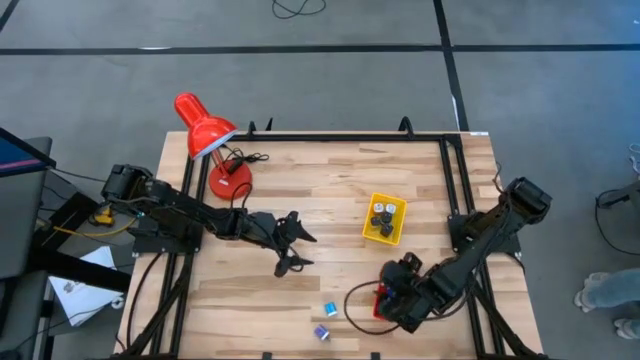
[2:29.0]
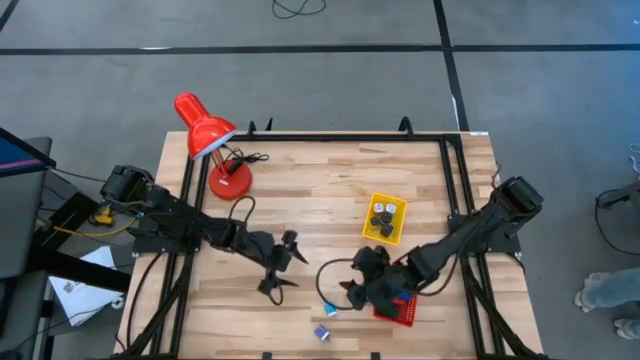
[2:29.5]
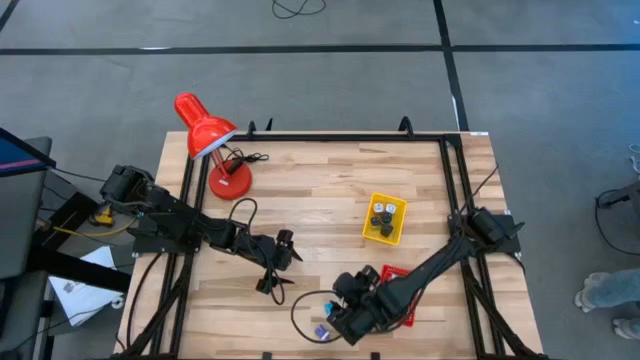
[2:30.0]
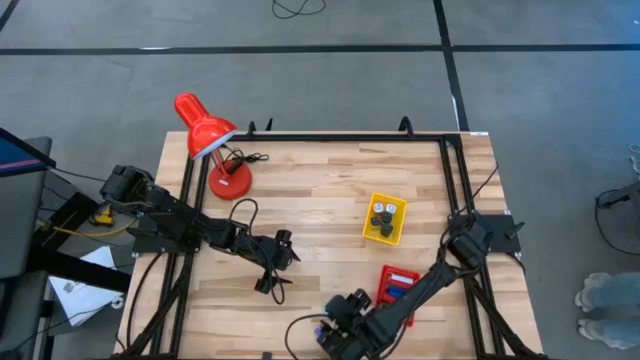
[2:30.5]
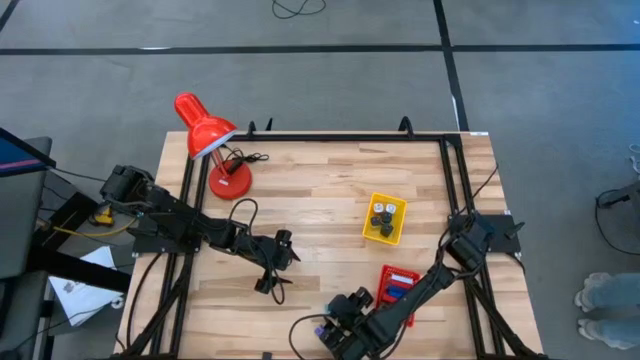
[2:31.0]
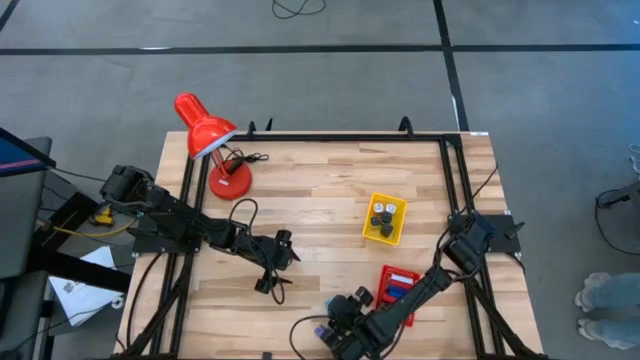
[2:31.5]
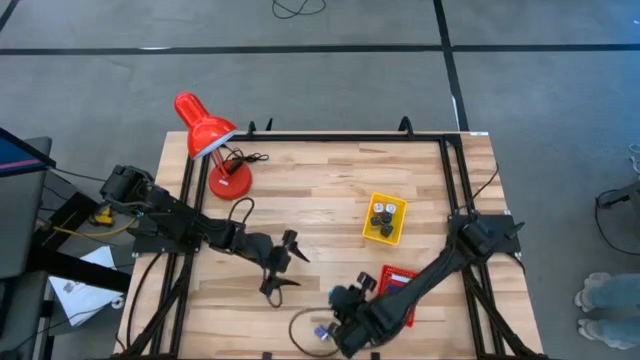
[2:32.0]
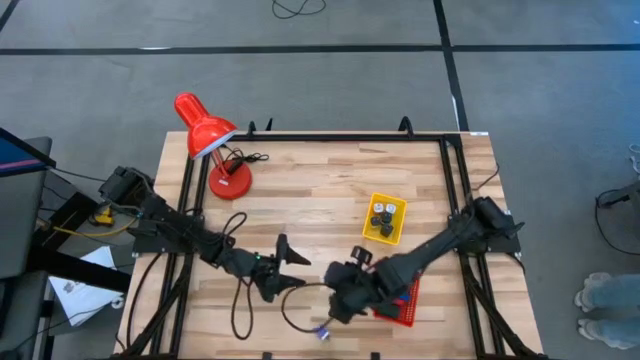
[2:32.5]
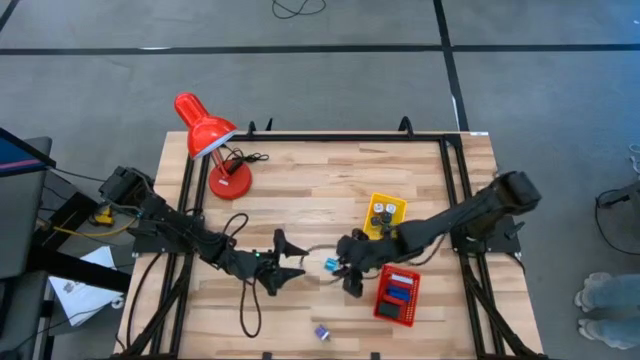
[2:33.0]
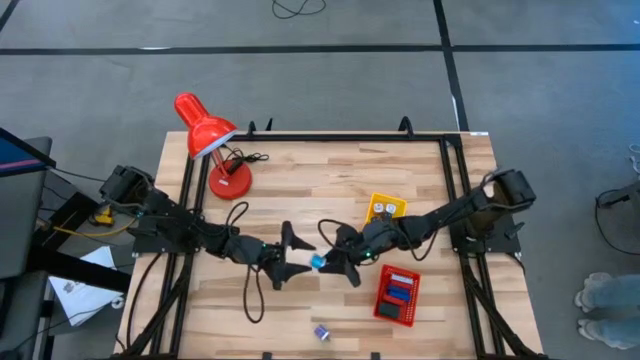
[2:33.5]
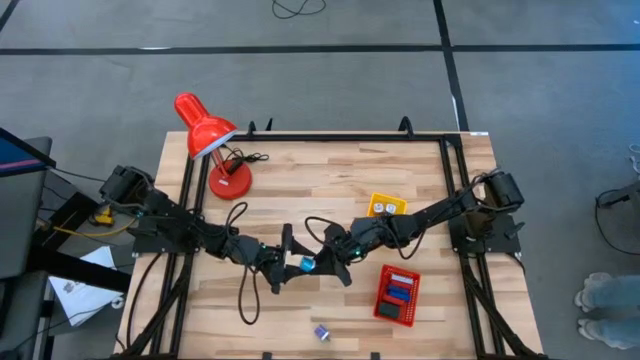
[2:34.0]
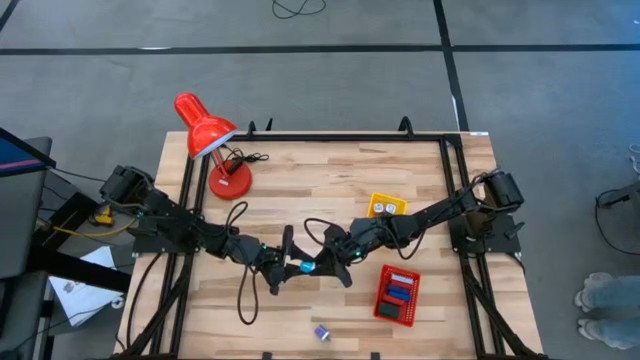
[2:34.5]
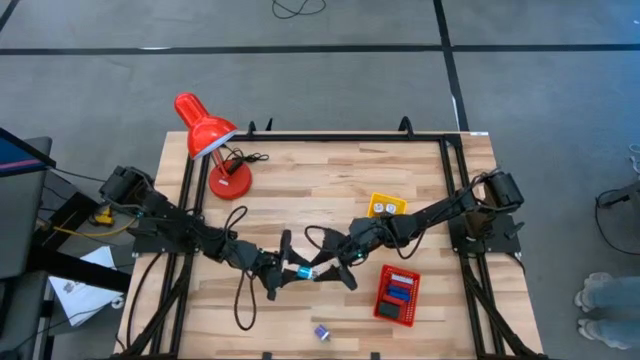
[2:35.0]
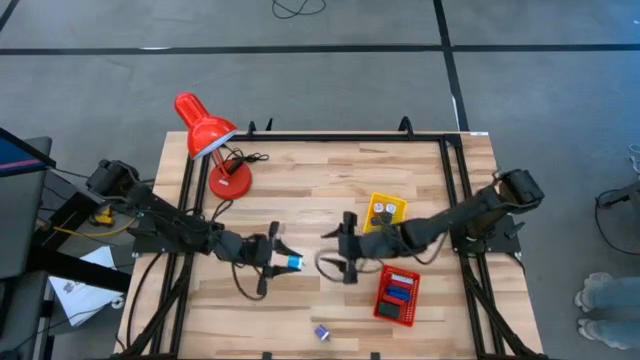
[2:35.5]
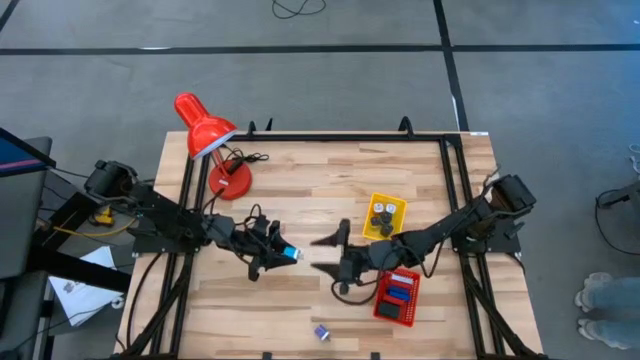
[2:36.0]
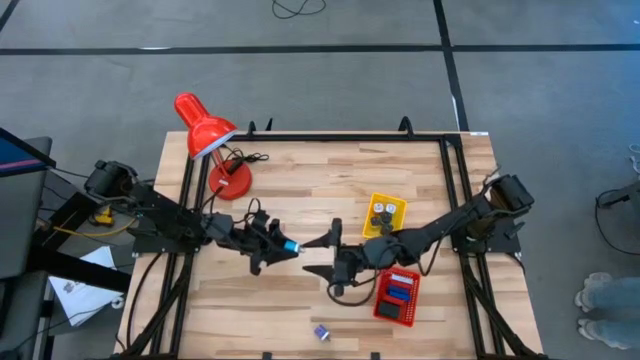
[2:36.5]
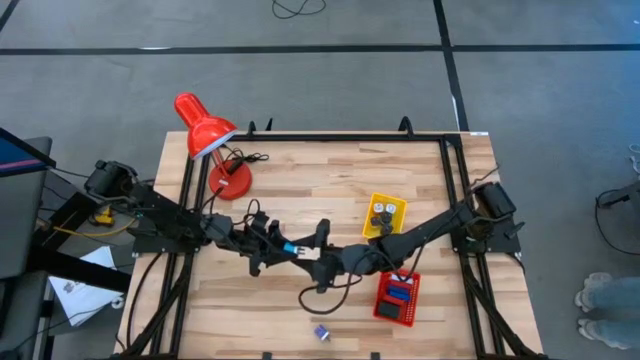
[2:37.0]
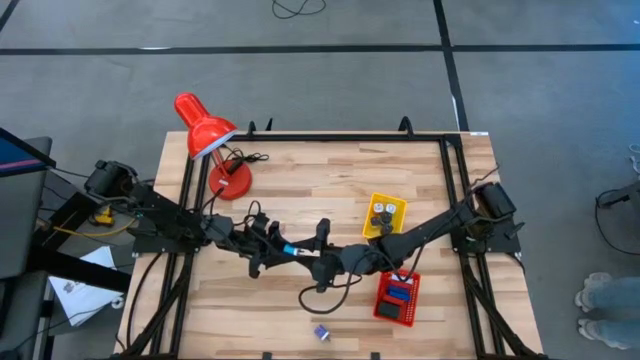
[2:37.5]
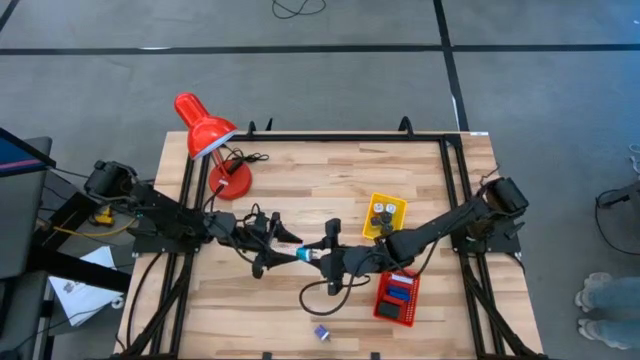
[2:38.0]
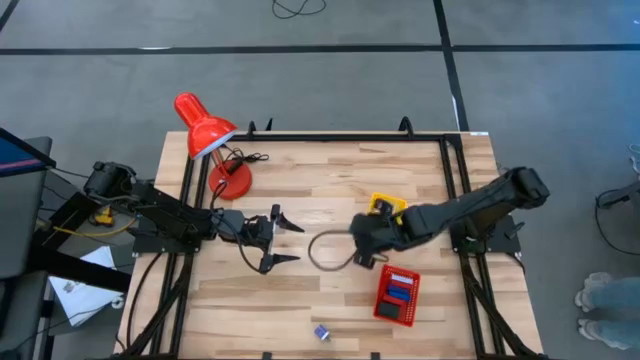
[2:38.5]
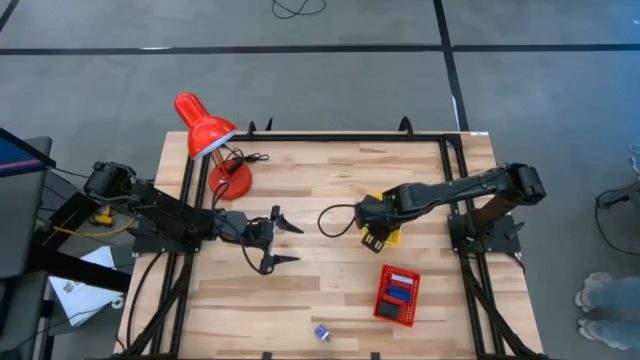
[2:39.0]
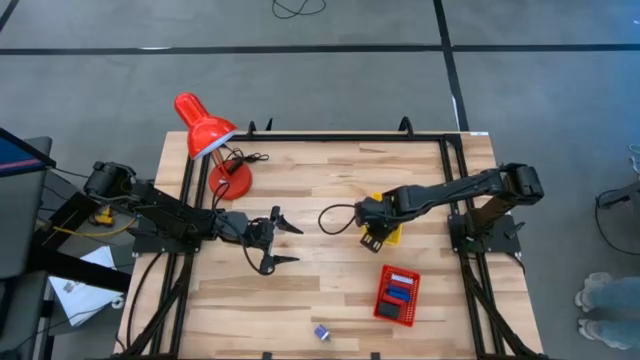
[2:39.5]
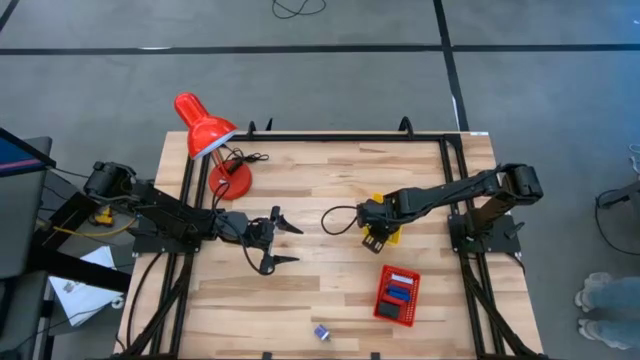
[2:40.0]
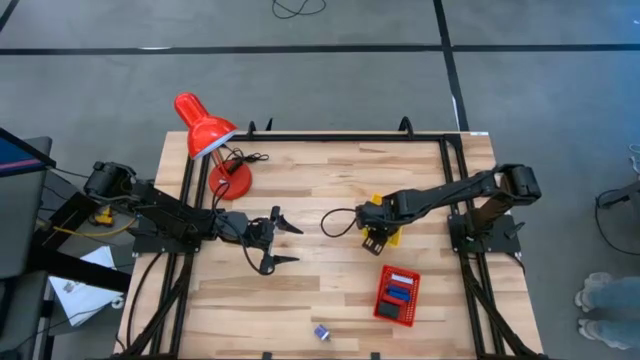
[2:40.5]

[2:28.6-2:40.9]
Task: Pick & Place Office items
Put the blue charger adapter into the yellow bin

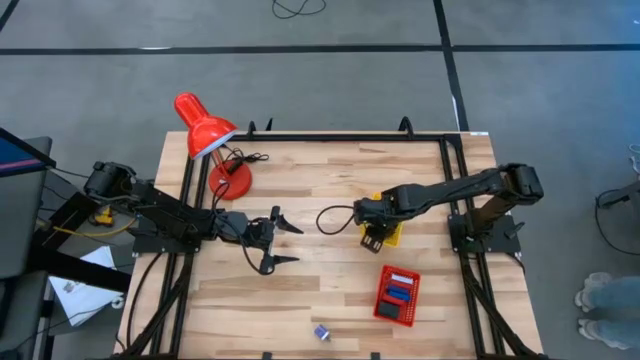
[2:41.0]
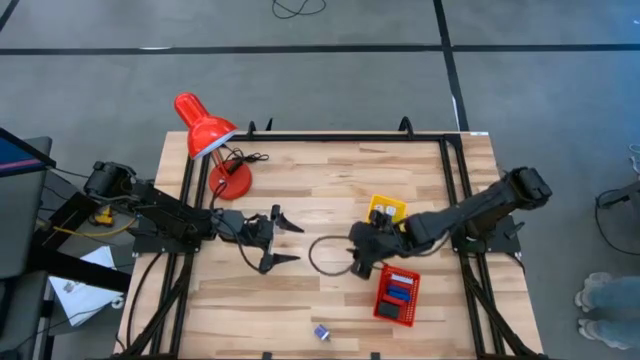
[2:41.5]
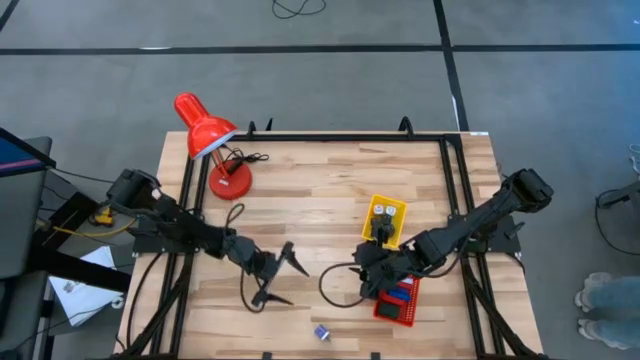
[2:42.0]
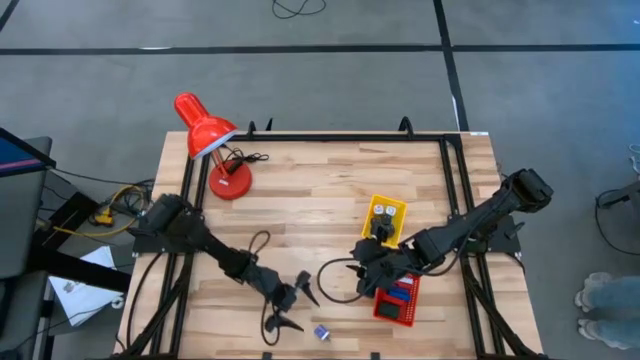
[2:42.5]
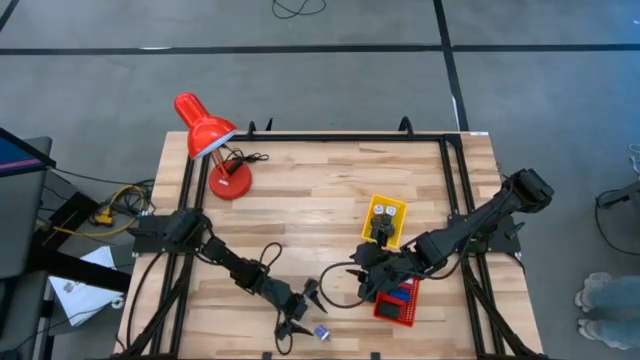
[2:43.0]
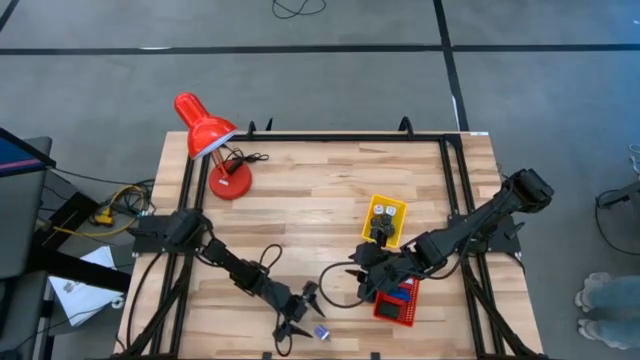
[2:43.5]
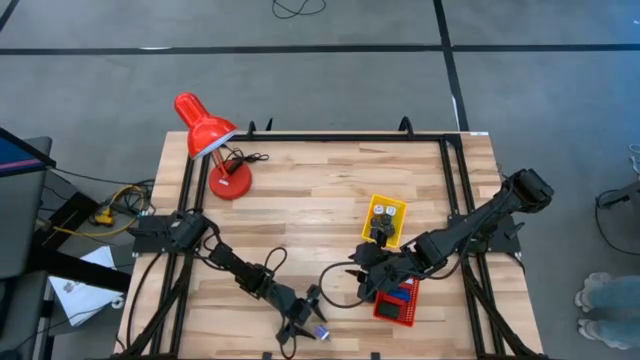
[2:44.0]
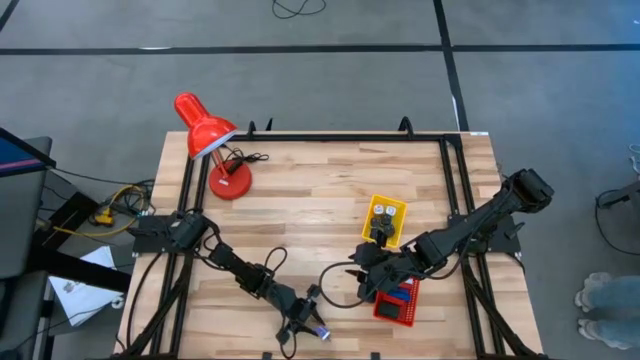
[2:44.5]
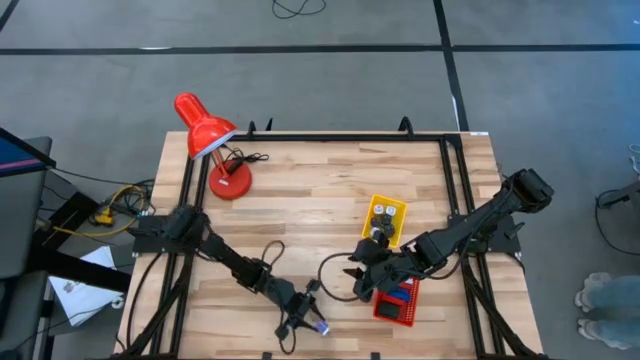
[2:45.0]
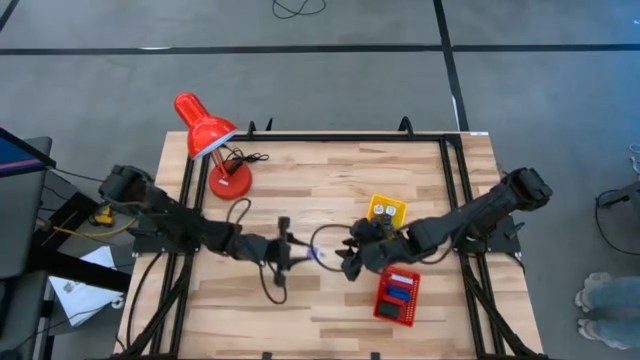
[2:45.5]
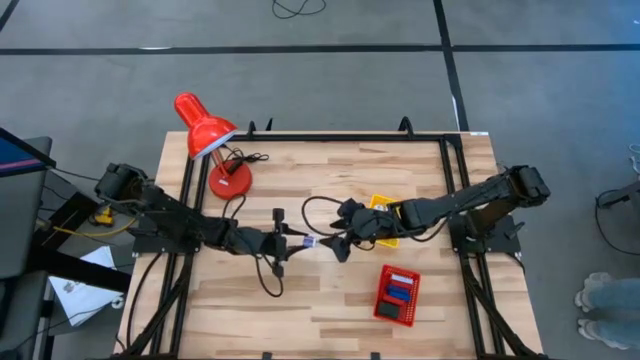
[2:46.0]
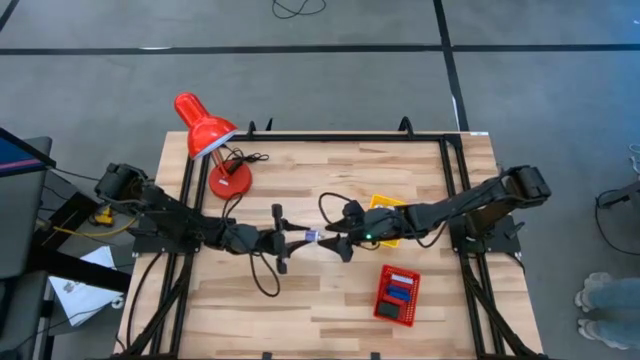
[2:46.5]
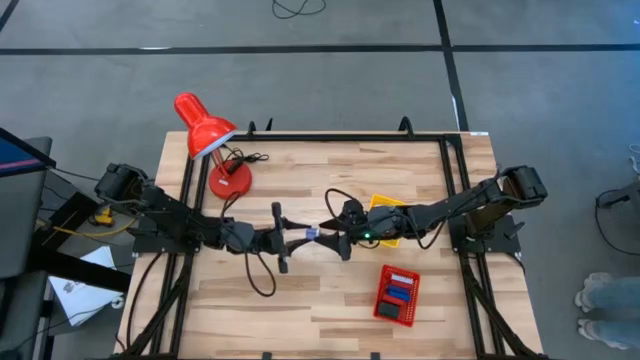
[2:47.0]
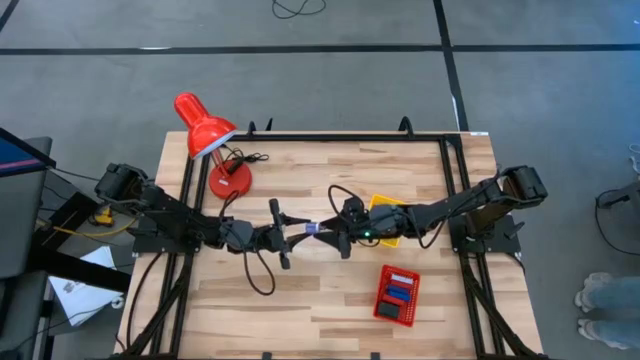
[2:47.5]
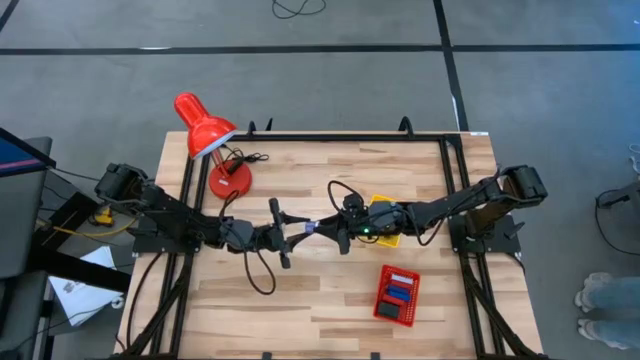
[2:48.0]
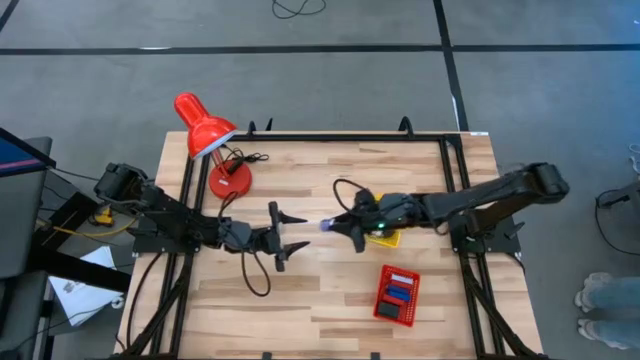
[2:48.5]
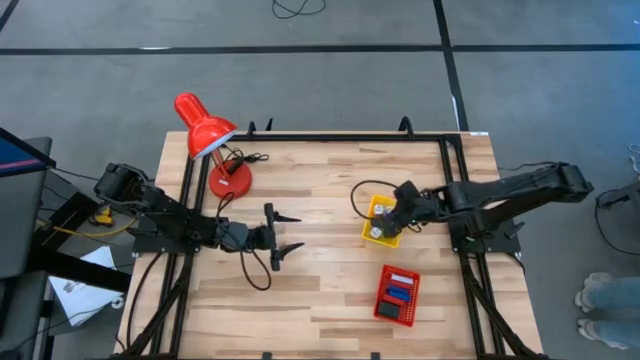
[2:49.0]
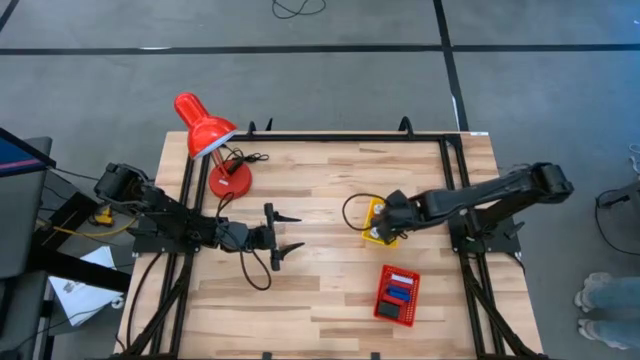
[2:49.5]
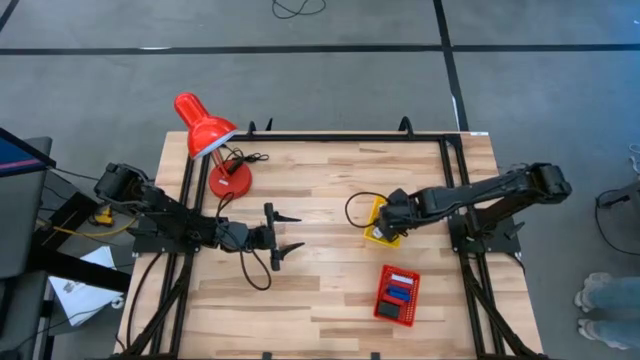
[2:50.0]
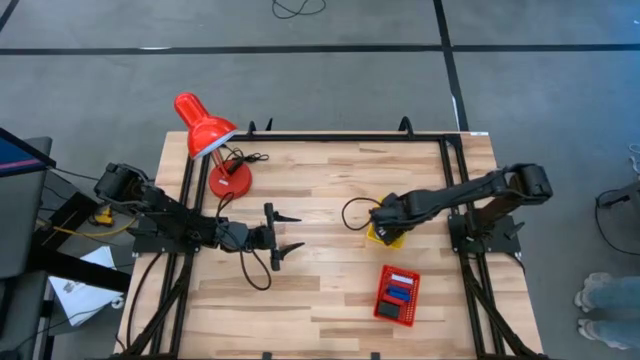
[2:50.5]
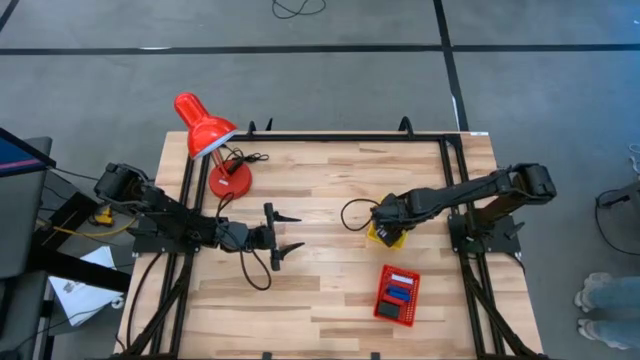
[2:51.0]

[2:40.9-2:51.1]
Put the violet charger adapter into the yellow bin
